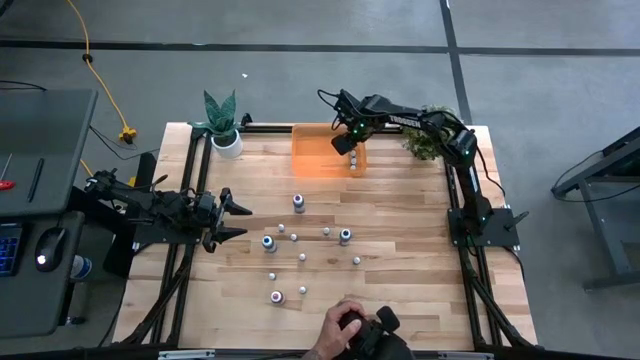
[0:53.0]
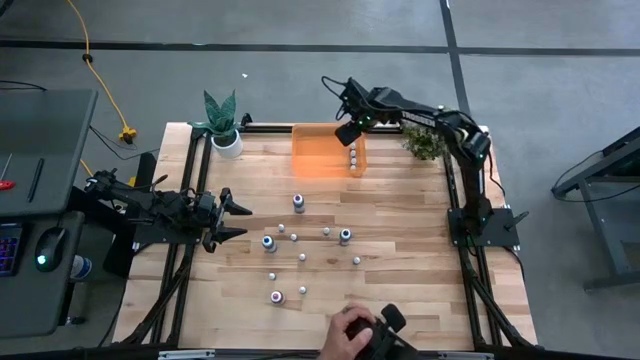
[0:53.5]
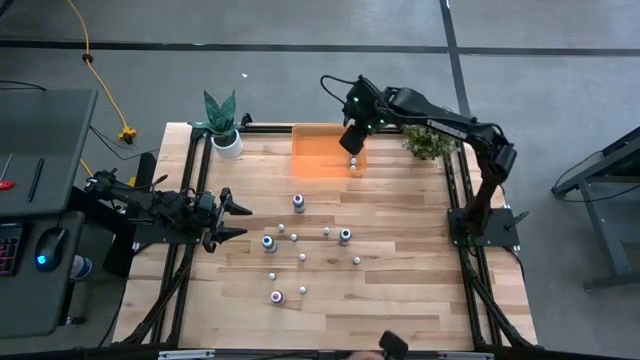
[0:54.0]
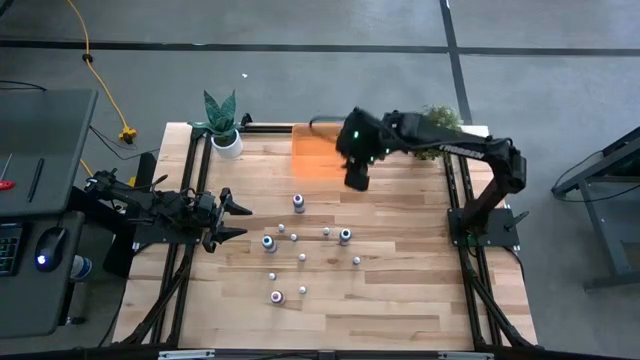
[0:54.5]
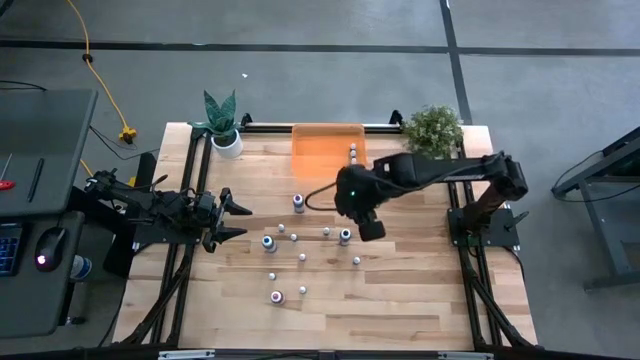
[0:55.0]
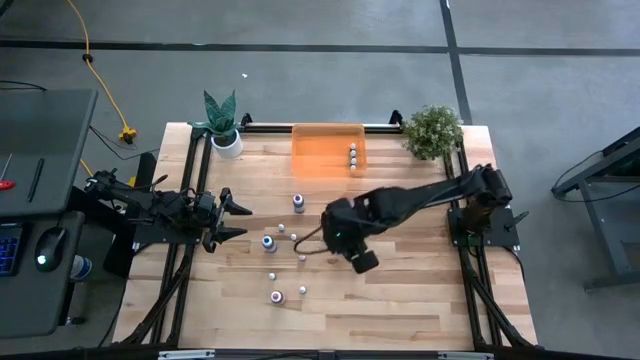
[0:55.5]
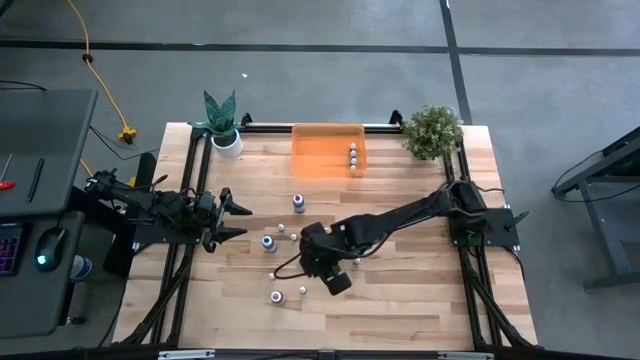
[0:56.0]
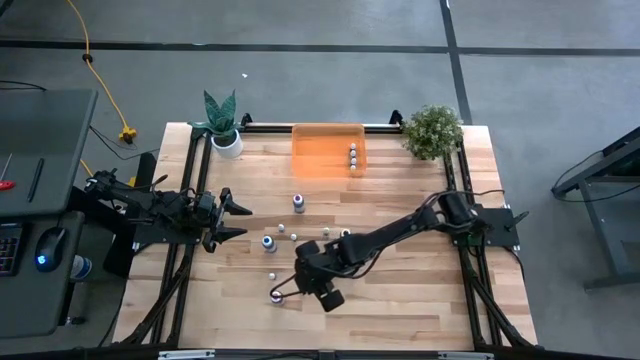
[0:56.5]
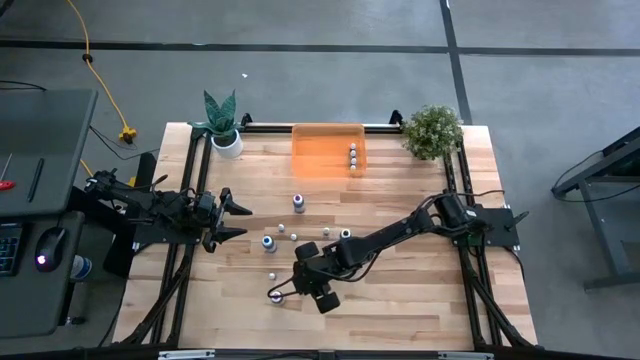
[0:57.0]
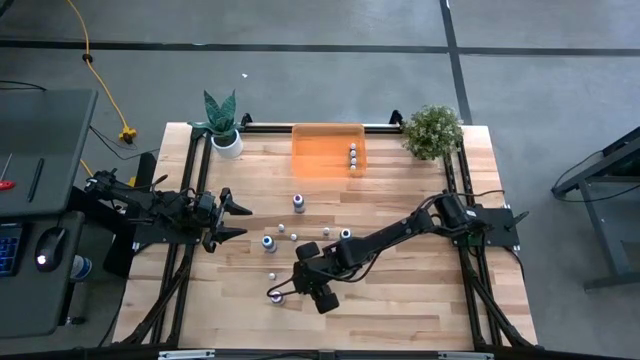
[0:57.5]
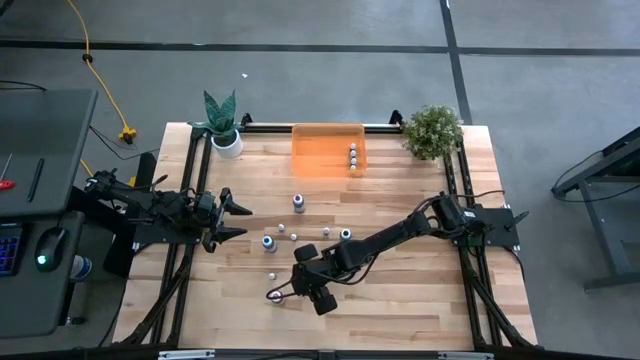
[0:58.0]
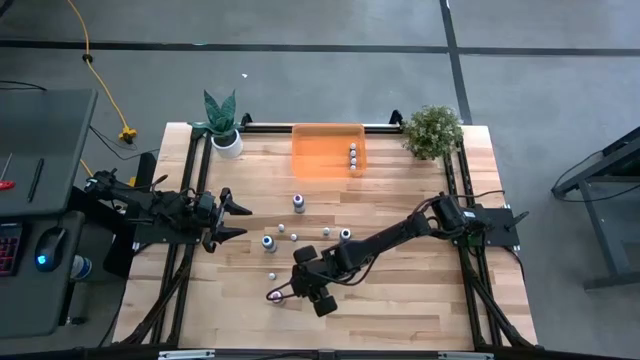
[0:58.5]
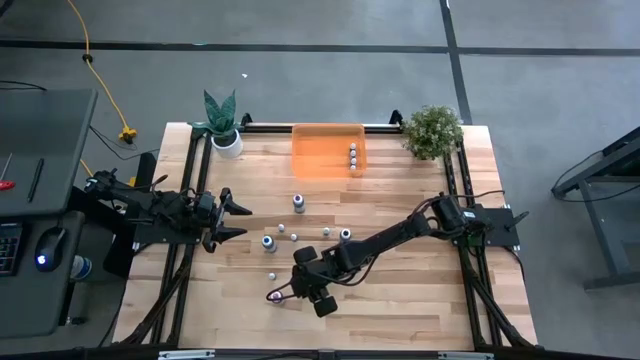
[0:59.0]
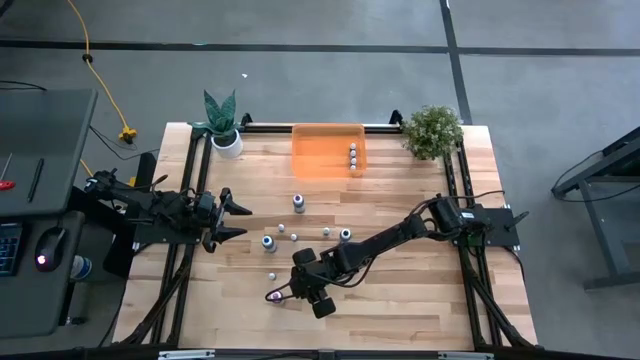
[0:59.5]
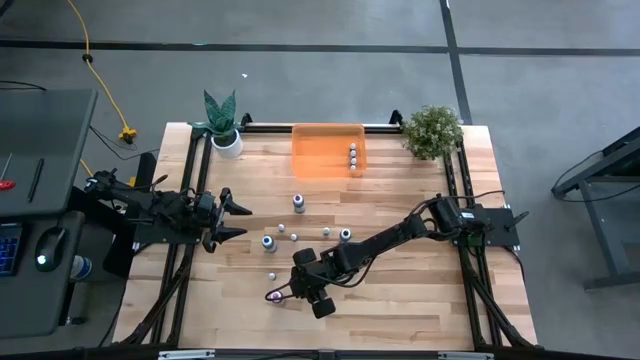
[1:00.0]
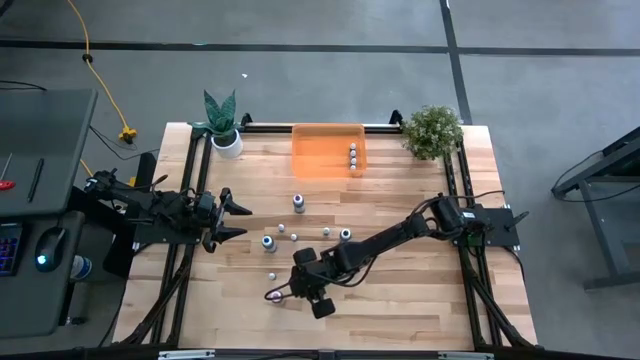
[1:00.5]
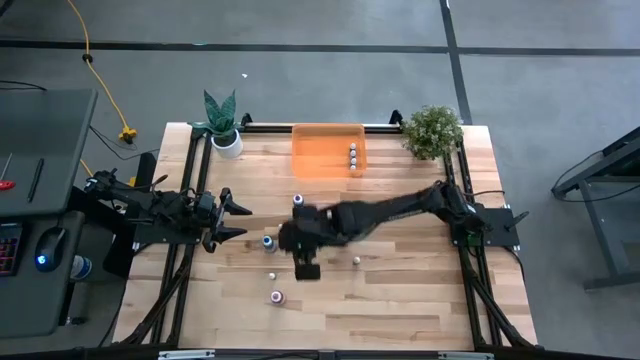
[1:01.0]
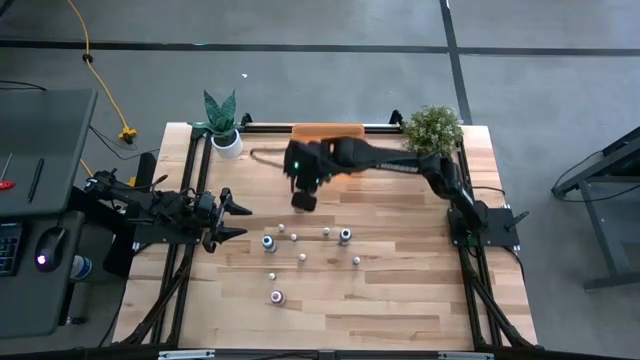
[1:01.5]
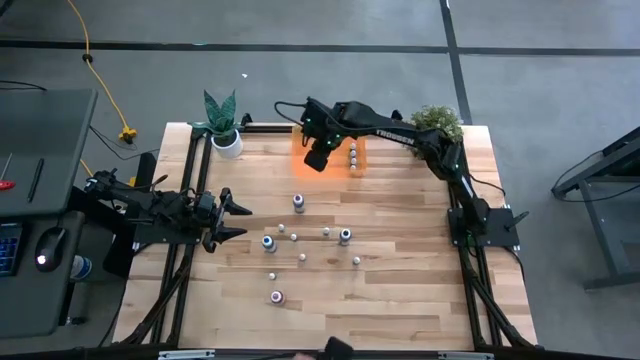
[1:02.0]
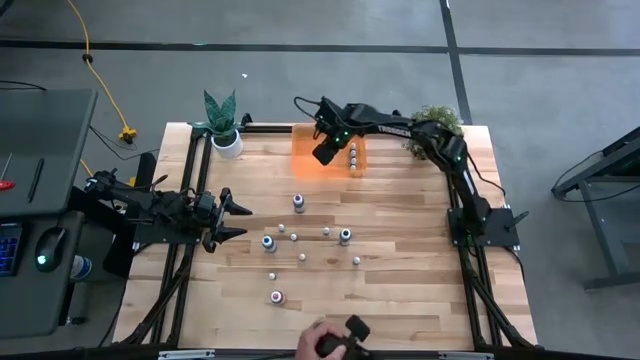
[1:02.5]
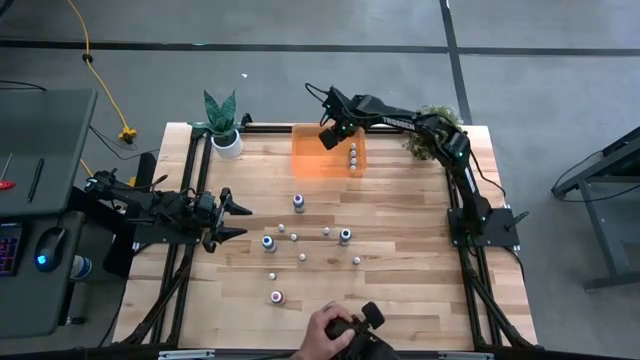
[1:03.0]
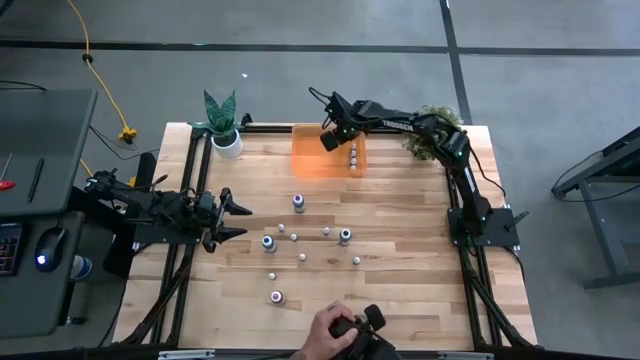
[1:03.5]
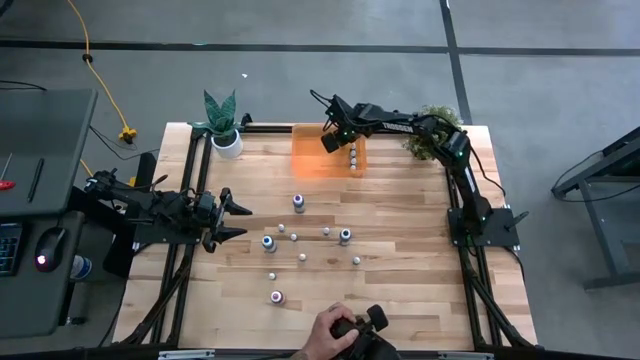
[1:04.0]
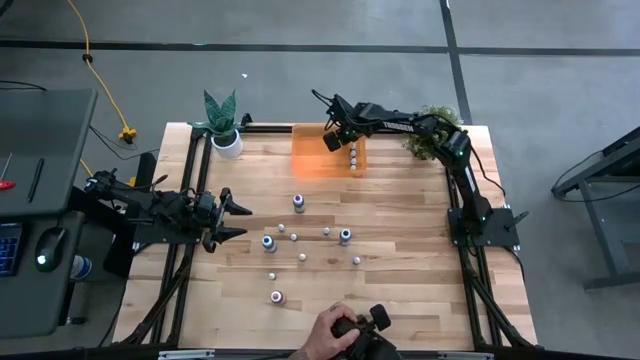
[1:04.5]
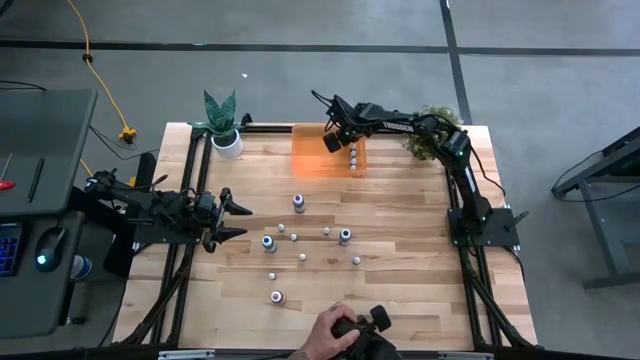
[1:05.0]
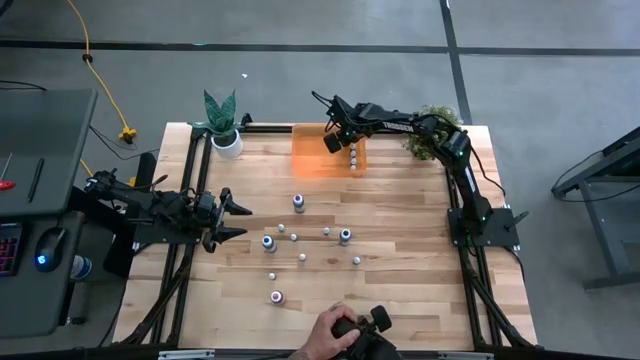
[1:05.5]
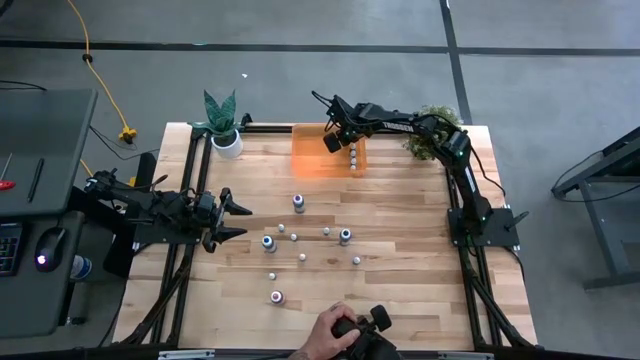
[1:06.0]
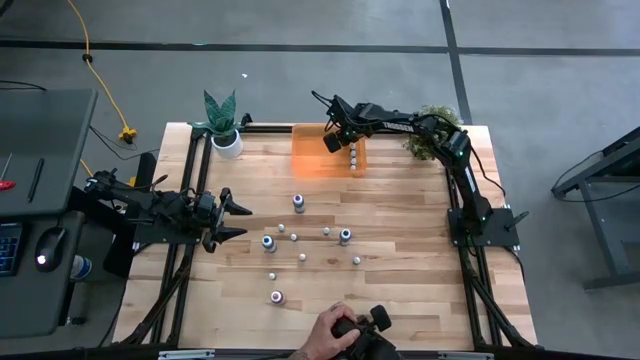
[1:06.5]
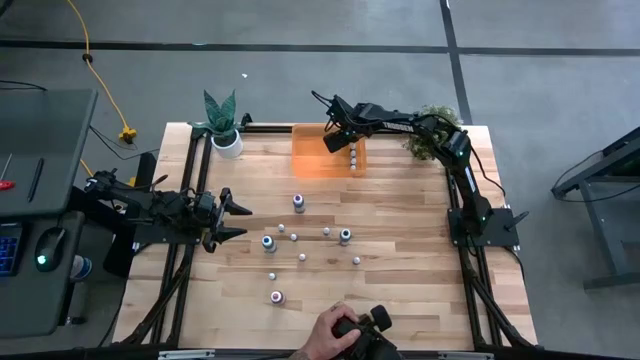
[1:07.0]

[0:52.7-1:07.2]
Task: Pick & Place food coloring
Put the small black food coloring bottle into the orange bin

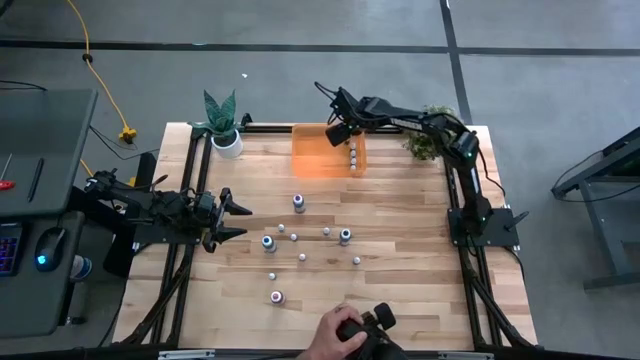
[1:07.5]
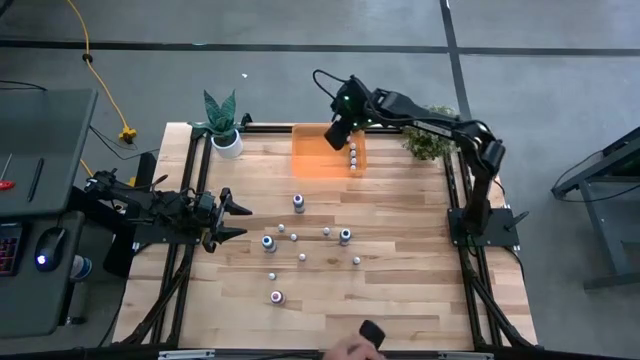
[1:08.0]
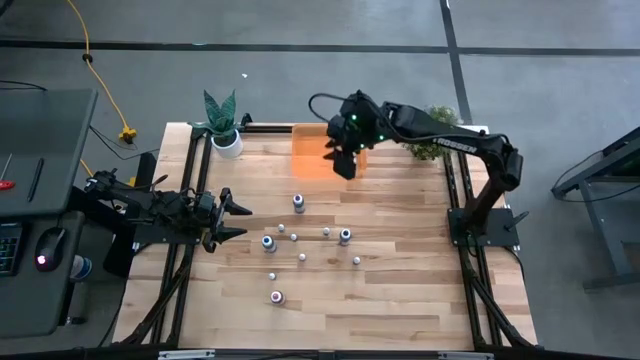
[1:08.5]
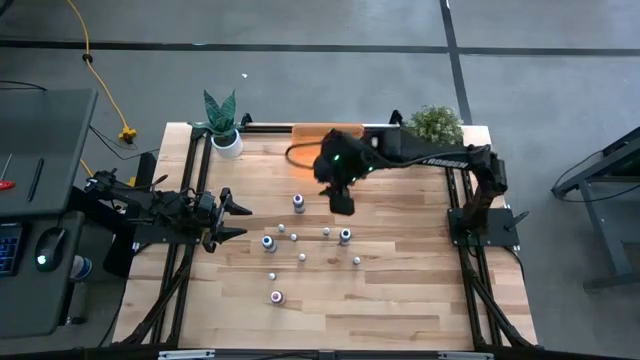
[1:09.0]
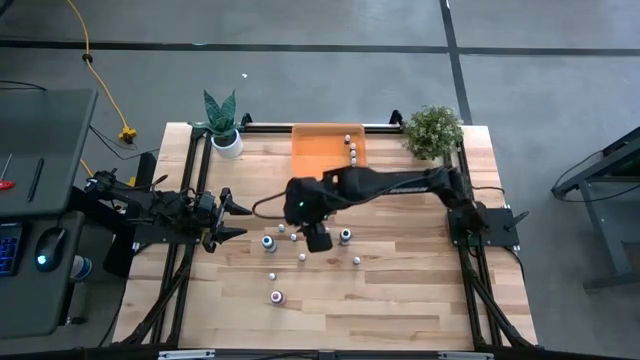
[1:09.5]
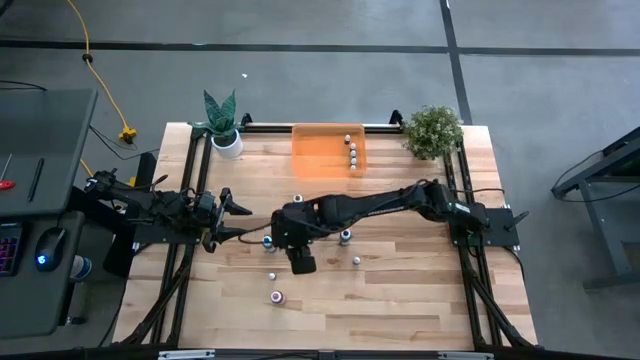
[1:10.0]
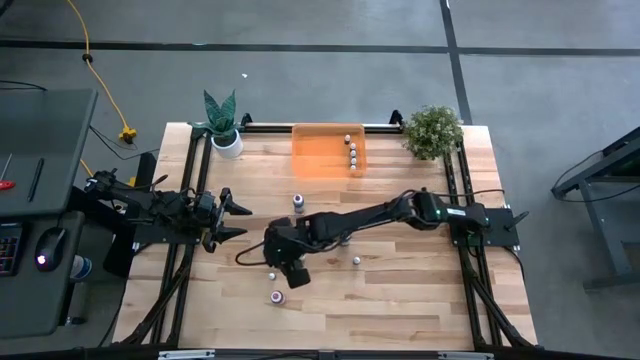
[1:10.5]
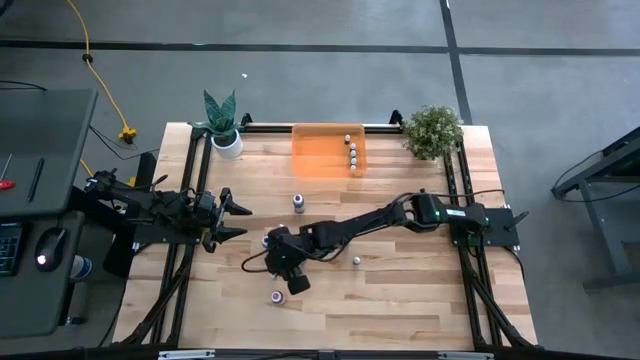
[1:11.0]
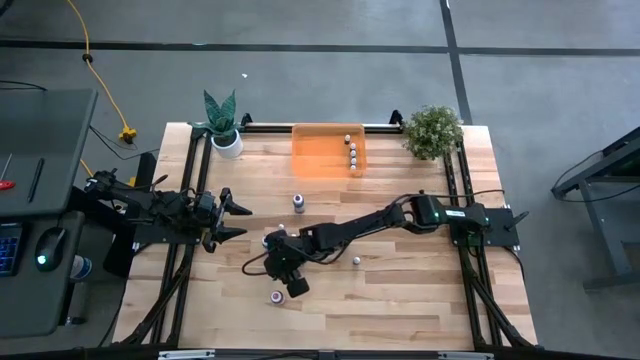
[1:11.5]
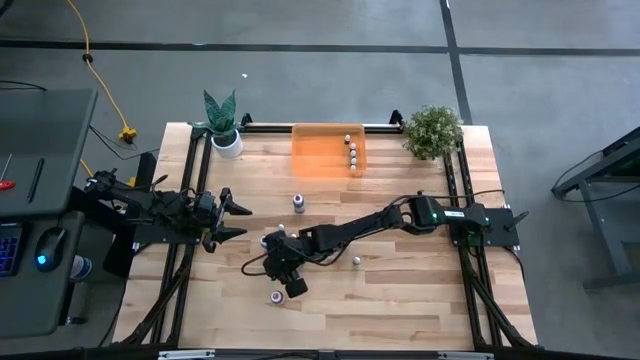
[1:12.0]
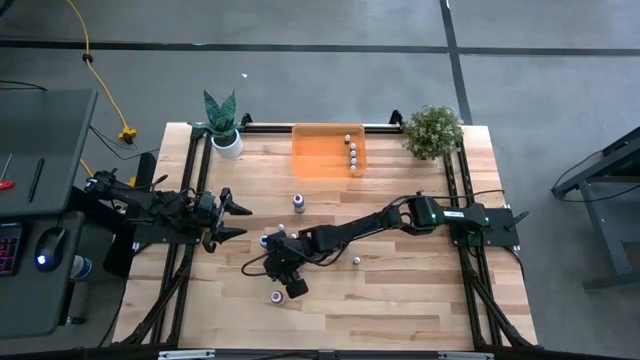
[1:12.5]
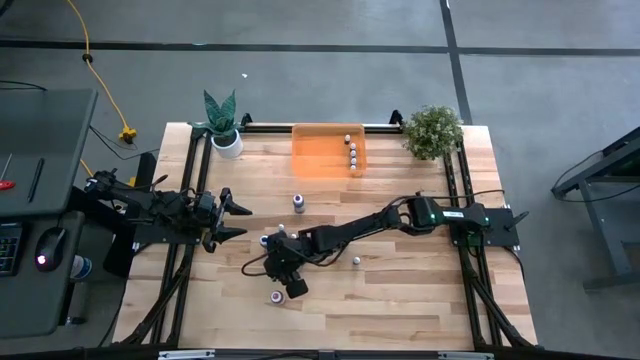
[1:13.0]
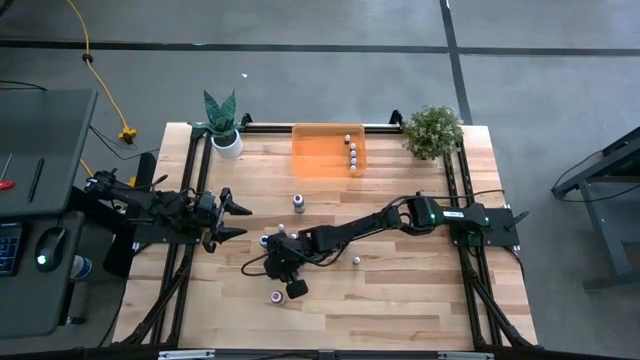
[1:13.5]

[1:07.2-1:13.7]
Put the small black food coloring bottle into the orange bin

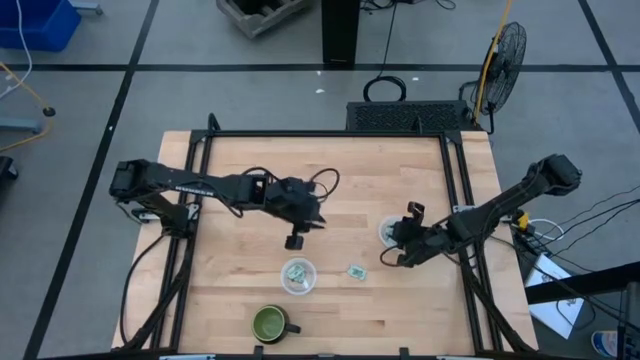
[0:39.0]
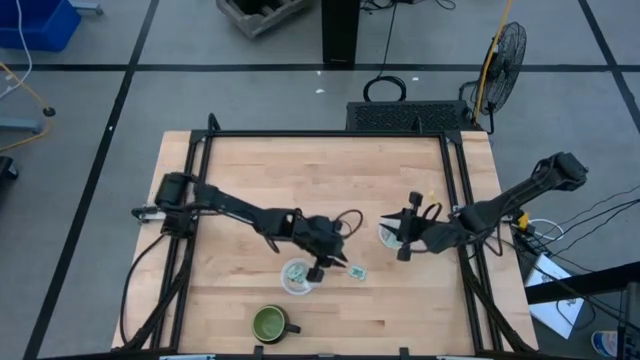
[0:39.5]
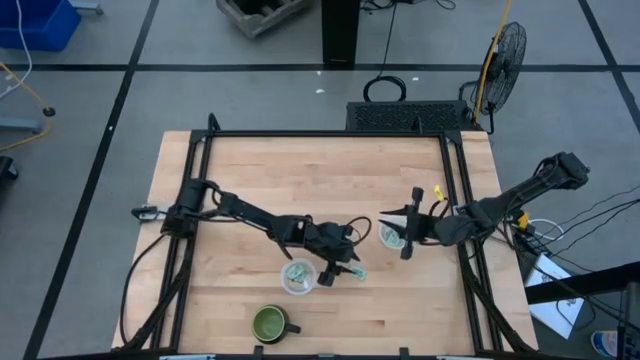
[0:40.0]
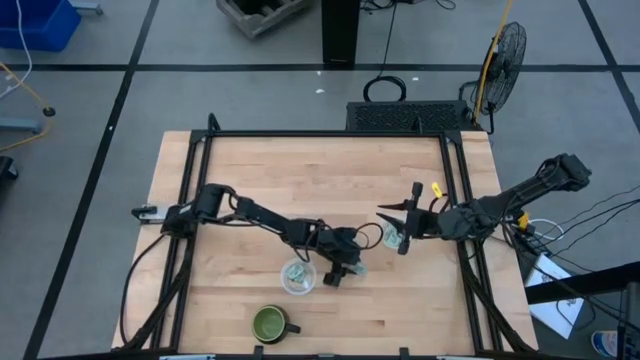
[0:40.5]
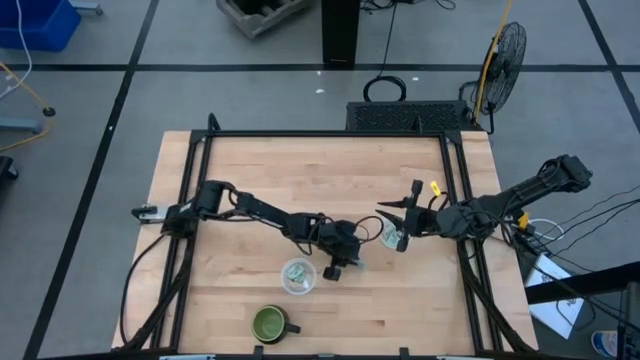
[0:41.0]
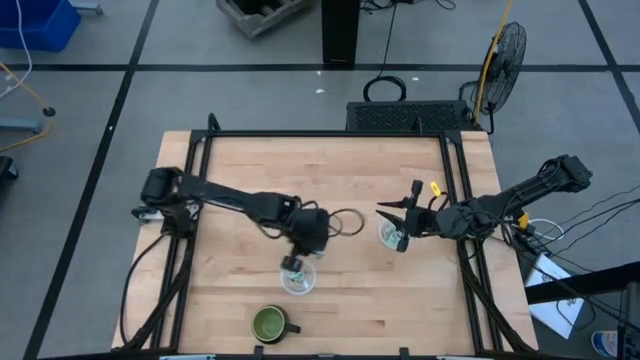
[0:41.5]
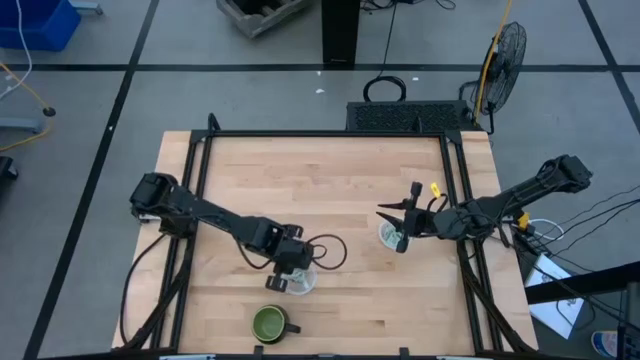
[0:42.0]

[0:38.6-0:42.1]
Task: Pick and place Stevia / Truvia into bins
Put the white stevia packet into the left transparent container
